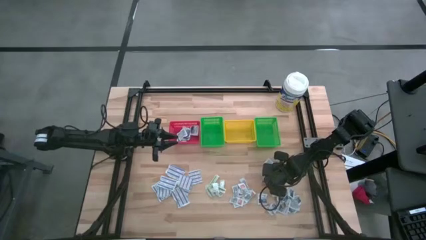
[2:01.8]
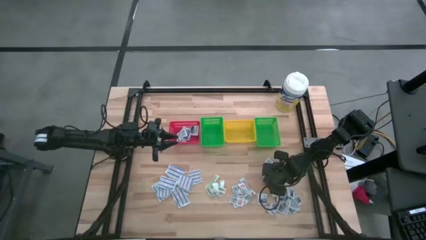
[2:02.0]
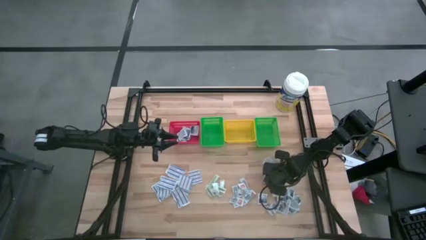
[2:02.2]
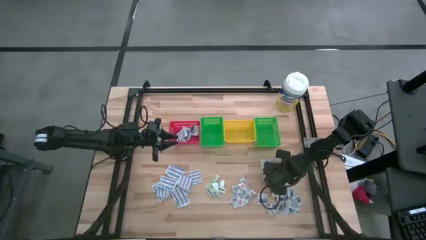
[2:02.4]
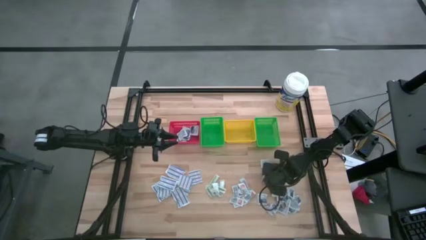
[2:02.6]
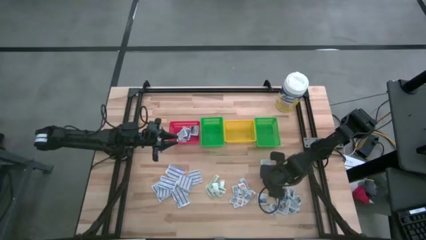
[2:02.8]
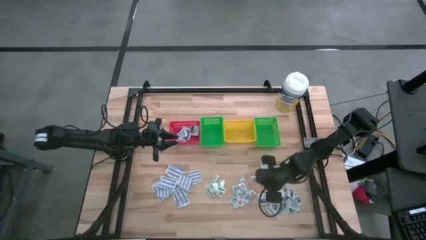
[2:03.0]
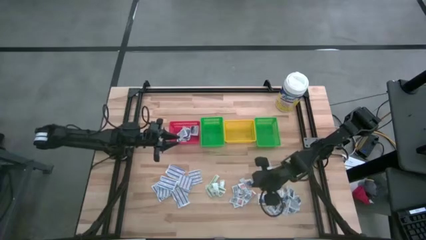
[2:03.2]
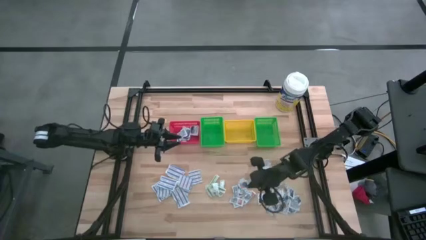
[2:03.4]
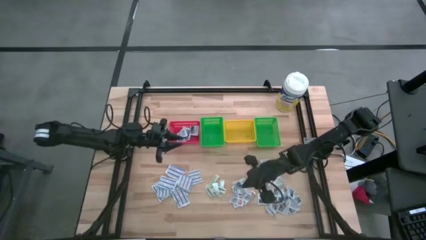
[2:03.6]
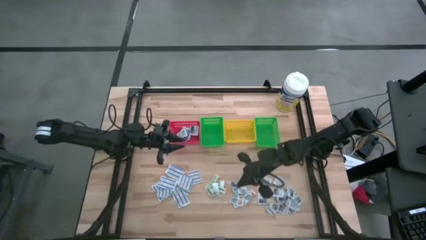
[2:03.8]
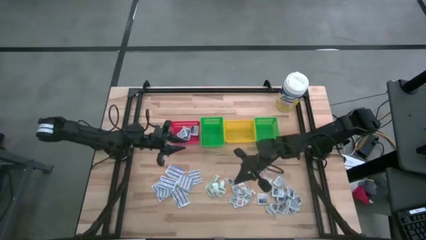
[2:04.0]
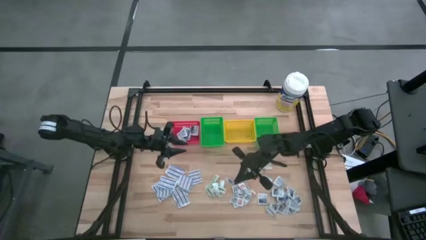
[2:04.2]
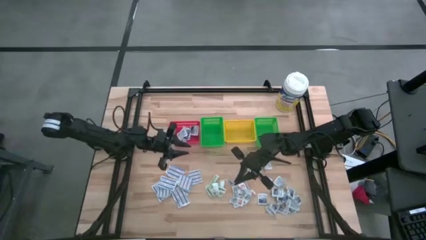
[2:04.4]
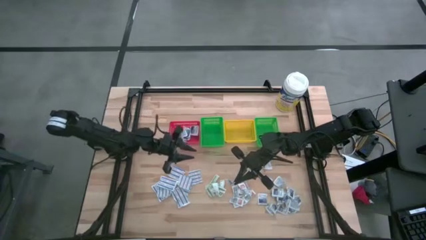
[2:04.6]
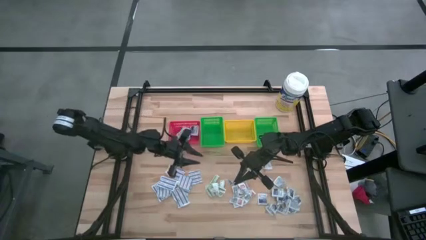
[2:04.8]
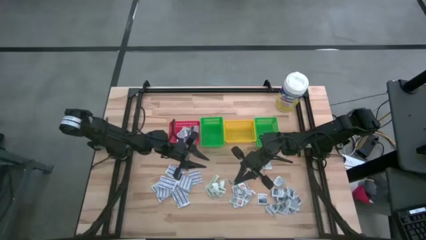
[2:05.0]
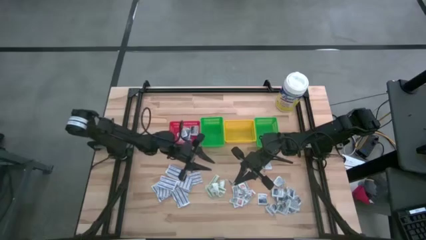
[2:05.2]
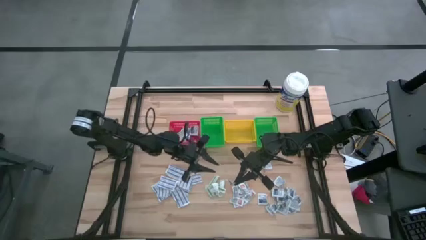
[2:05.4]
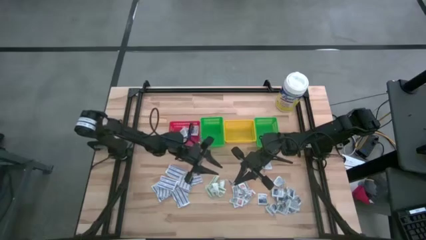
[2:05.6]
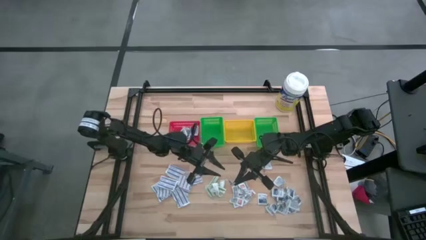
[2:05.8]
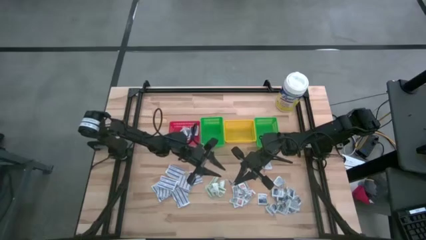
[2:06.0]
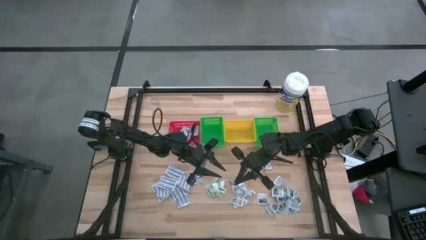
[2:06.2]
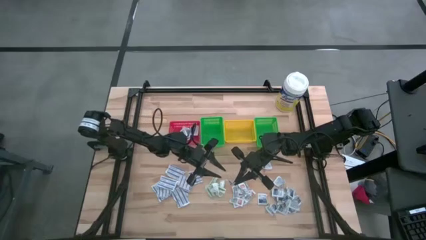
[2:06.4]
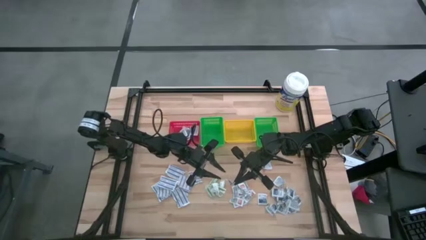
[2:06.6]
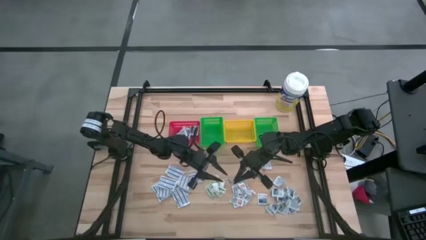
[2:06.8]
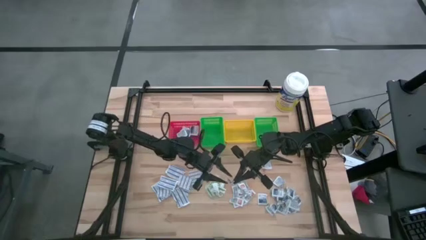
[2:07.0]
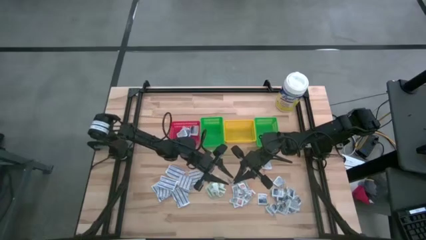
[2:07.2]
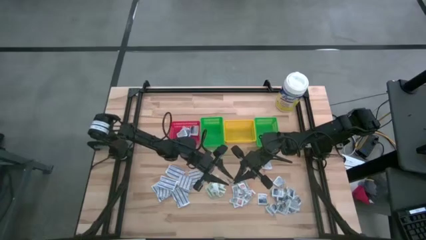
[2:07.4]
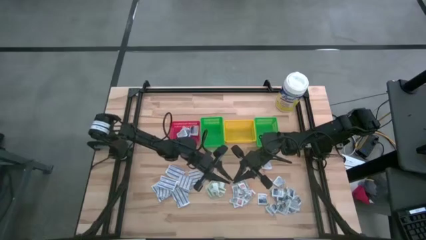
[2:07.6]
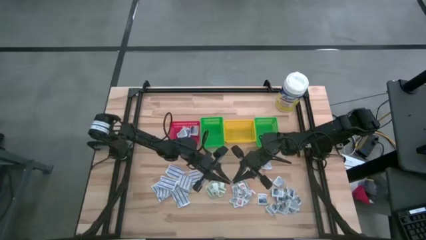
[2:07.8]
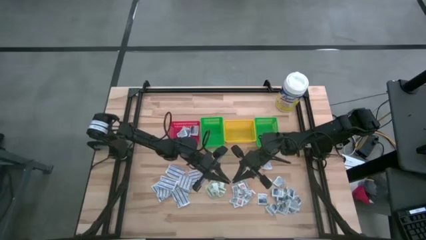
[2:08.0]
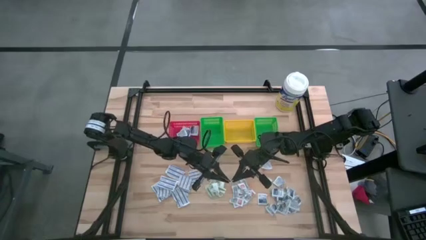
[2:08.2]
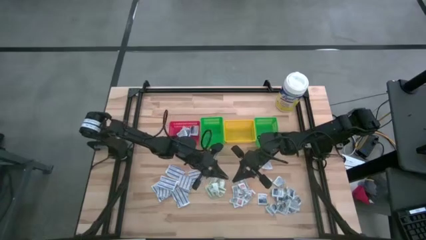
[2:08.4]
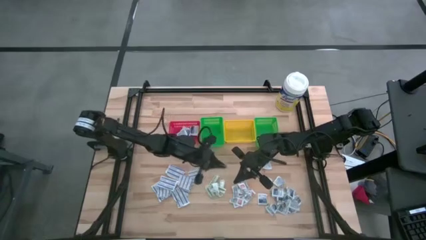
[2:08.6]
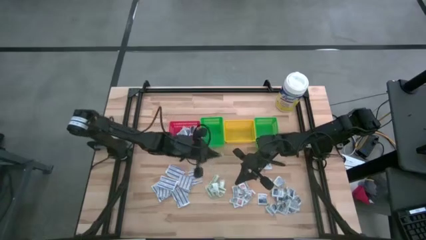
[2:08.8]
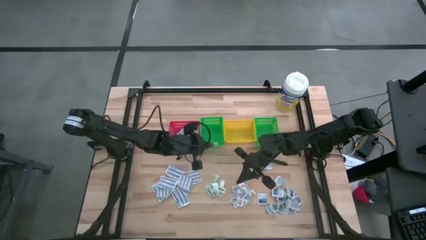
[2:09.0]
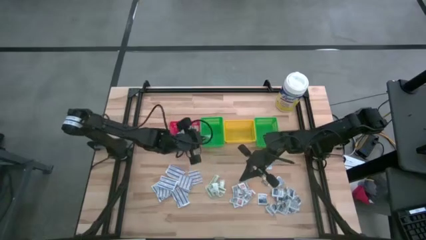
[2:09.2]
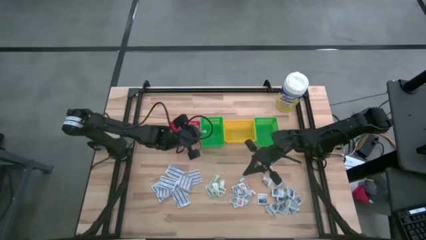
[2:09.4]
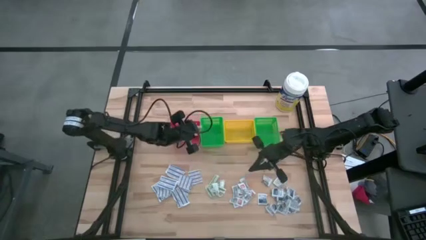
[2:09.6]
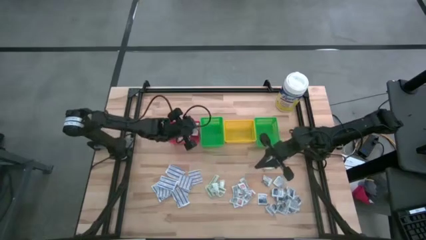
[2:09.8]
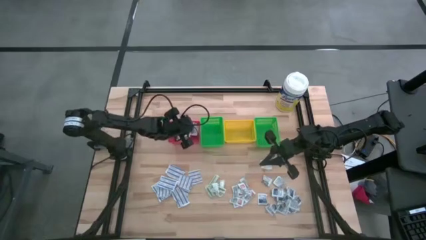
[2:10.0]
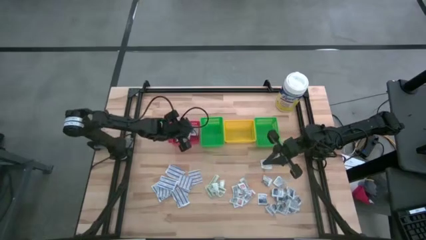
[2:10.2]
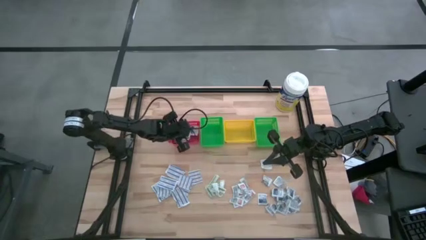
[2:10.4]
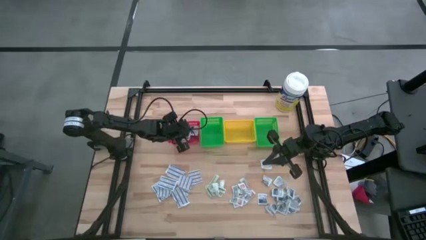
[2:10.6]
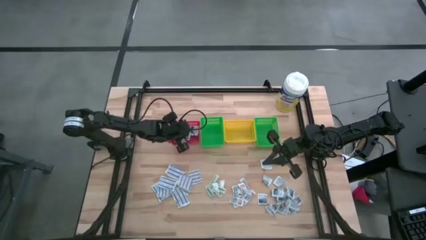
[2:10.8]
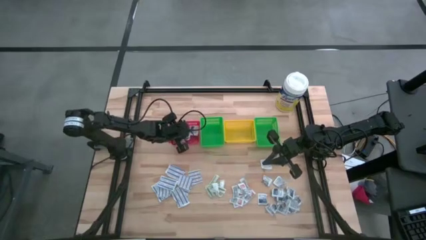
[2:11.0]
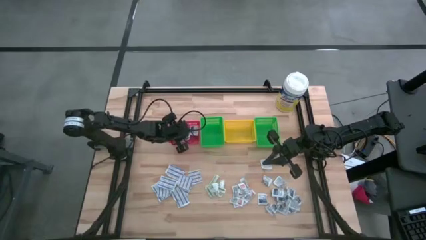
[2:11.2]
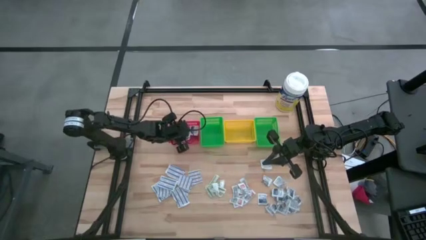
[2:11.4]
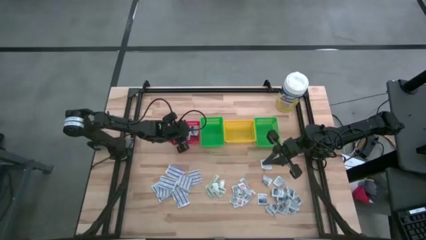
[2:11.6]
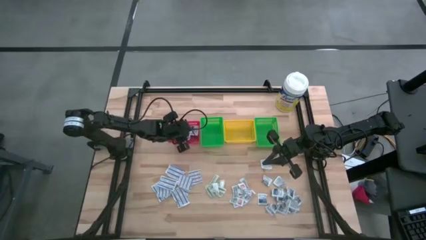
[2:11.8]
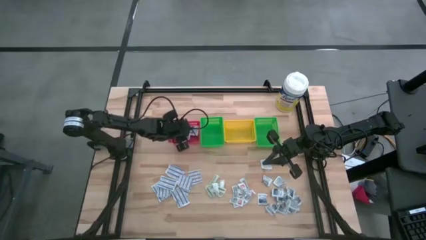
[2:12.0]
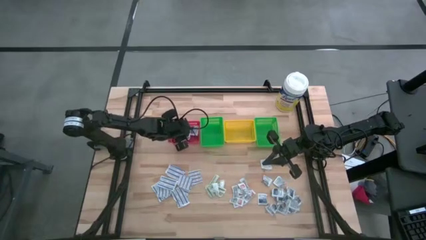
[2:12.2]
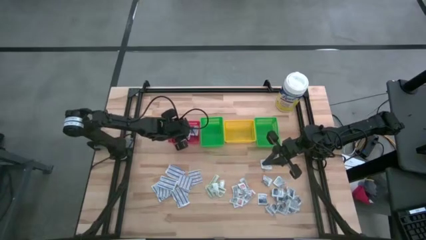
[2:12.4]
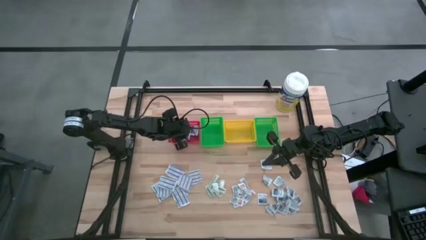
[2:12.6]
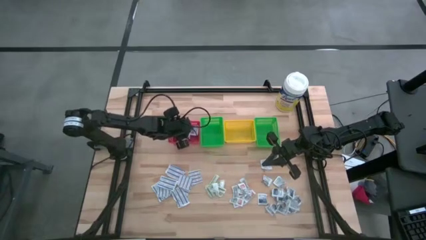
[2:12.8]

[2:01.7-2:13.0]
Task: Pick & Place First Aid Supplies
Put the alcohol pad into the red basket
